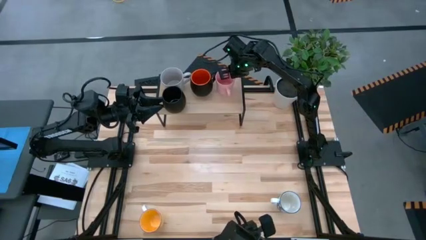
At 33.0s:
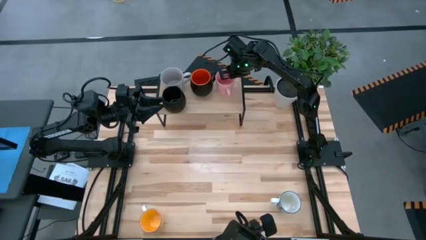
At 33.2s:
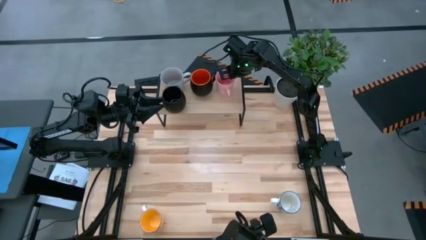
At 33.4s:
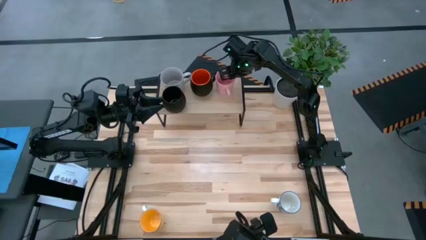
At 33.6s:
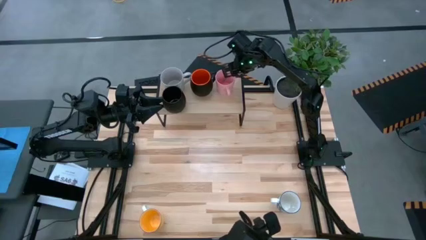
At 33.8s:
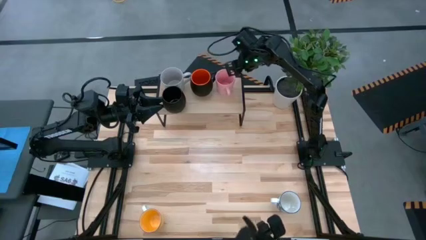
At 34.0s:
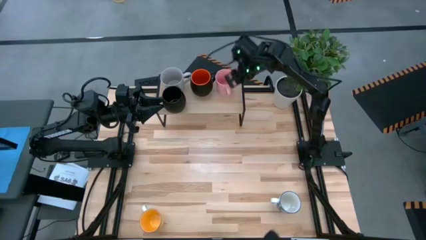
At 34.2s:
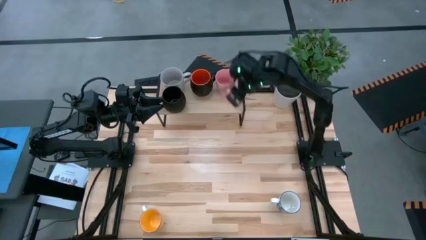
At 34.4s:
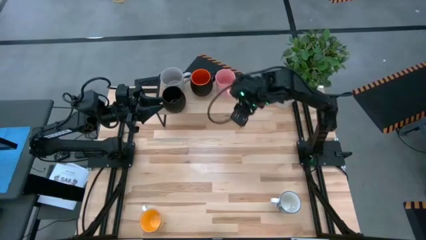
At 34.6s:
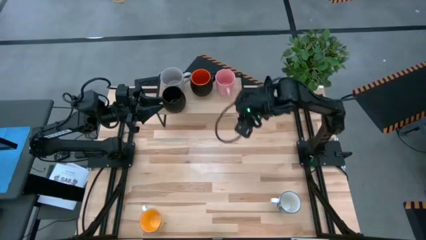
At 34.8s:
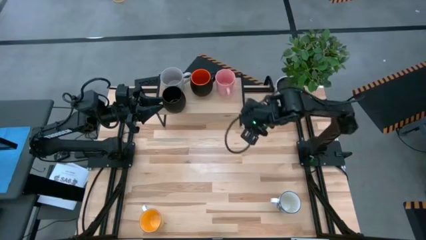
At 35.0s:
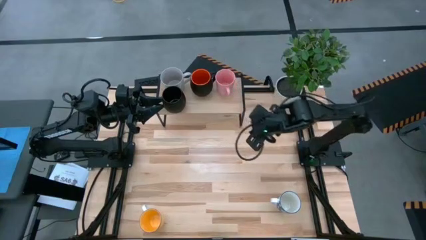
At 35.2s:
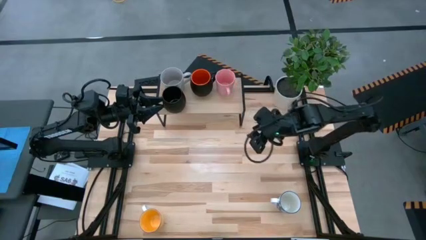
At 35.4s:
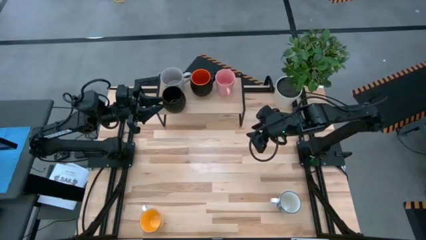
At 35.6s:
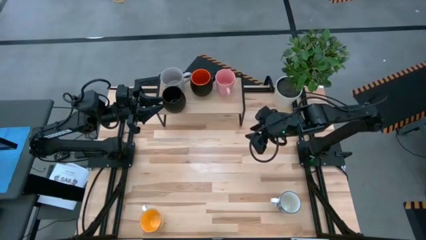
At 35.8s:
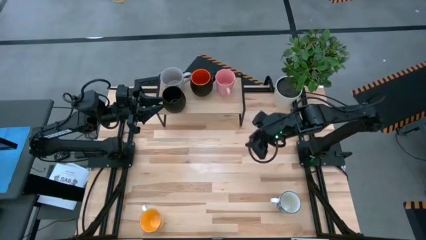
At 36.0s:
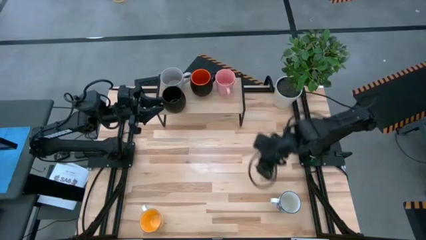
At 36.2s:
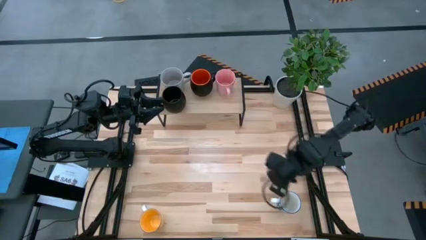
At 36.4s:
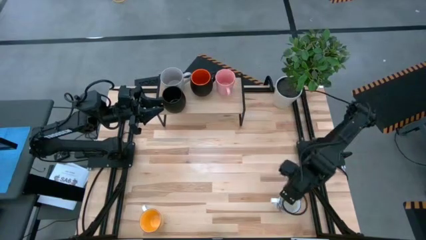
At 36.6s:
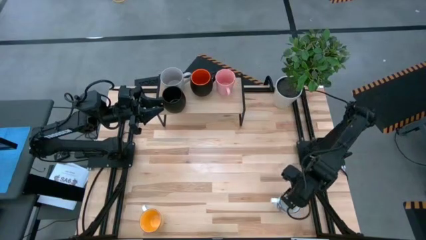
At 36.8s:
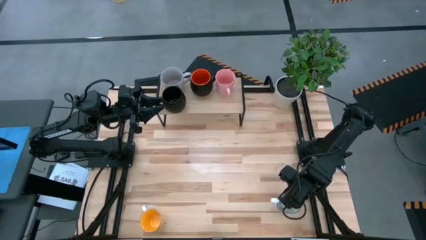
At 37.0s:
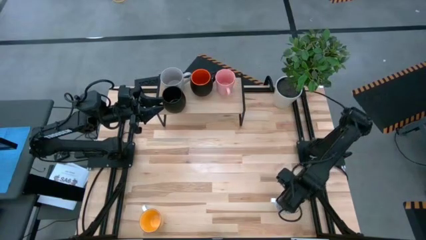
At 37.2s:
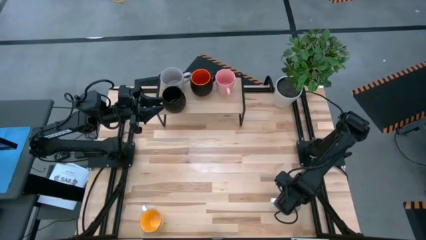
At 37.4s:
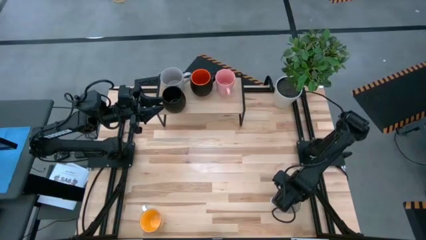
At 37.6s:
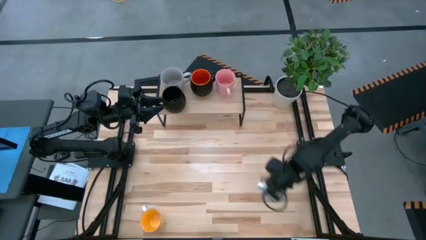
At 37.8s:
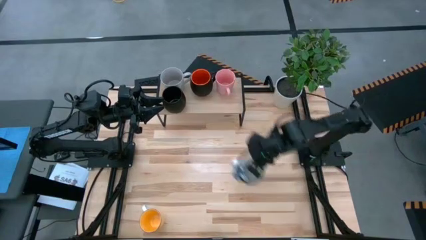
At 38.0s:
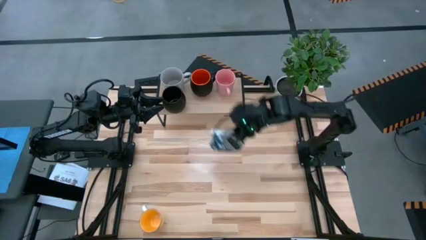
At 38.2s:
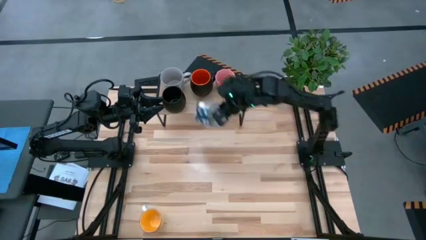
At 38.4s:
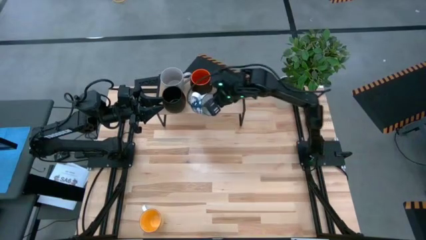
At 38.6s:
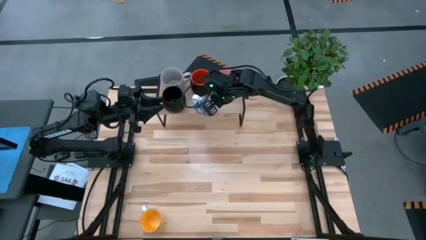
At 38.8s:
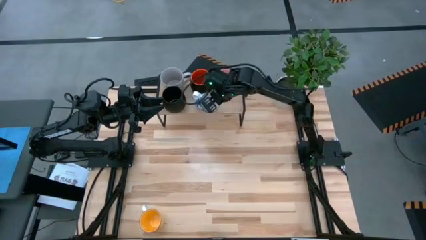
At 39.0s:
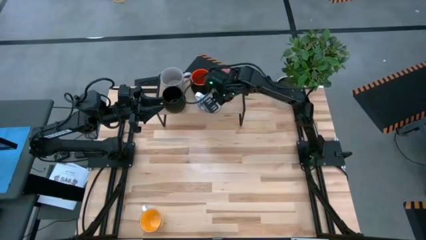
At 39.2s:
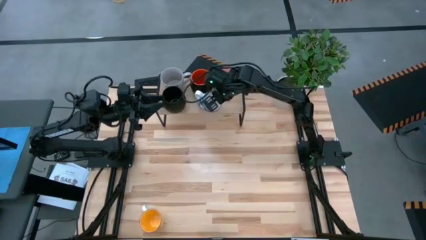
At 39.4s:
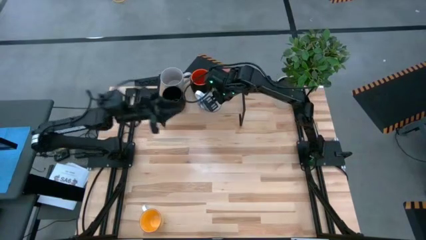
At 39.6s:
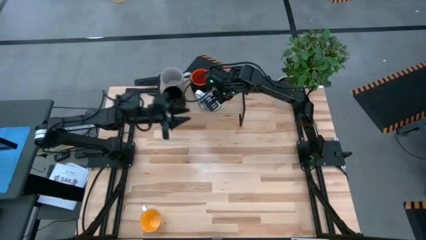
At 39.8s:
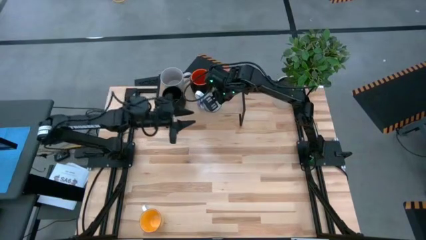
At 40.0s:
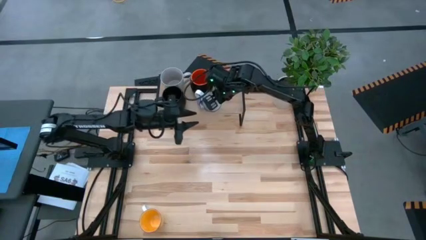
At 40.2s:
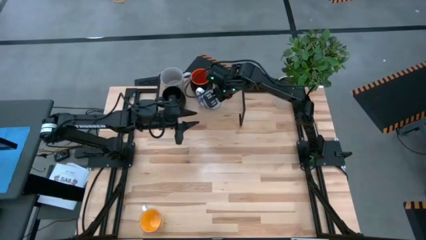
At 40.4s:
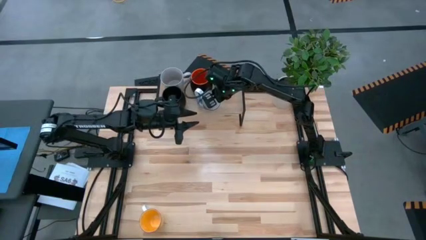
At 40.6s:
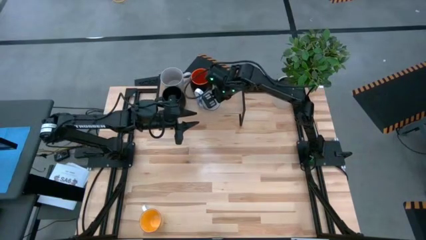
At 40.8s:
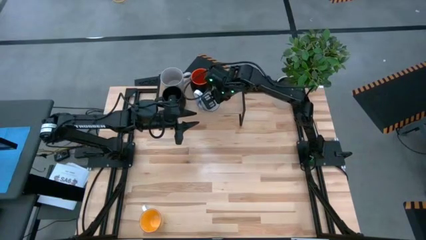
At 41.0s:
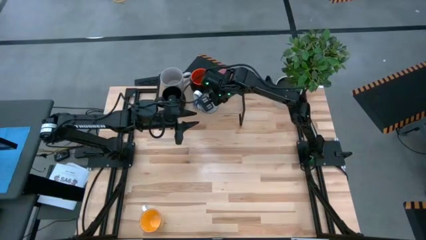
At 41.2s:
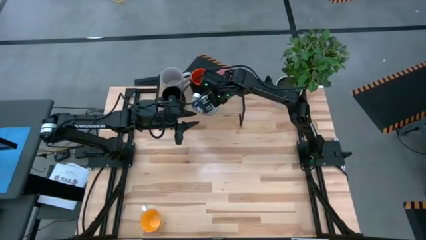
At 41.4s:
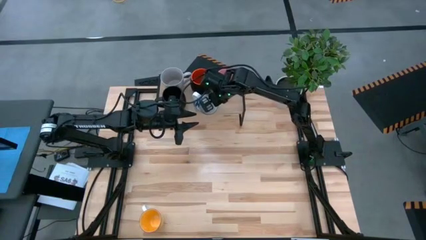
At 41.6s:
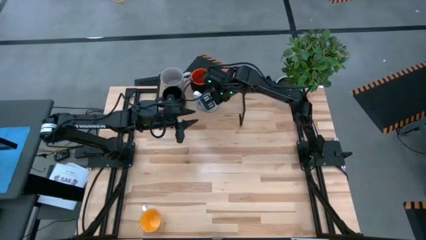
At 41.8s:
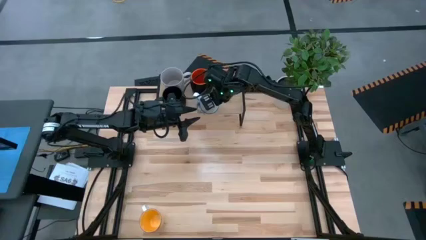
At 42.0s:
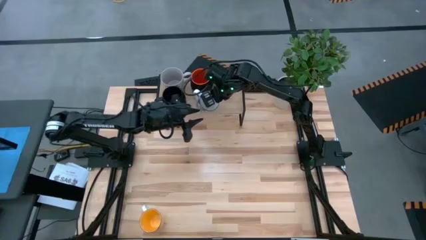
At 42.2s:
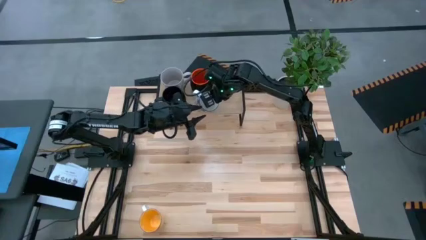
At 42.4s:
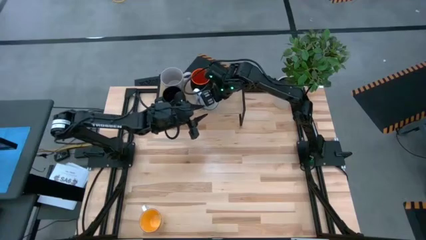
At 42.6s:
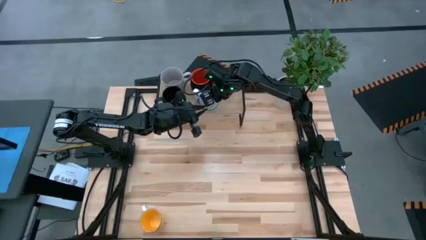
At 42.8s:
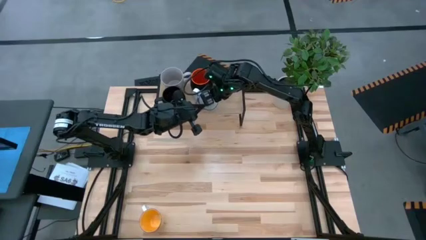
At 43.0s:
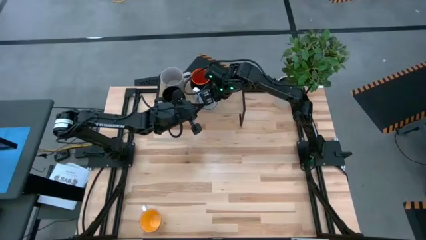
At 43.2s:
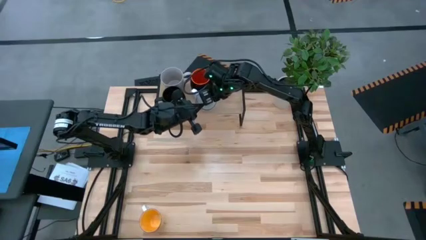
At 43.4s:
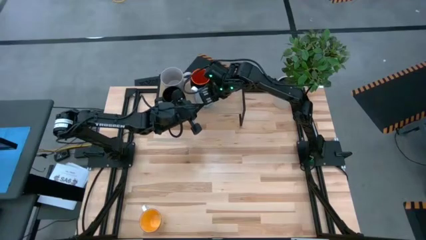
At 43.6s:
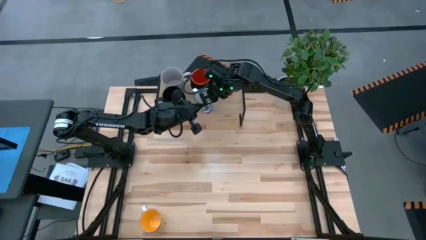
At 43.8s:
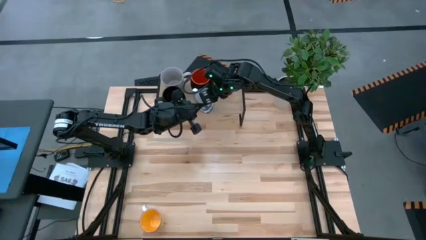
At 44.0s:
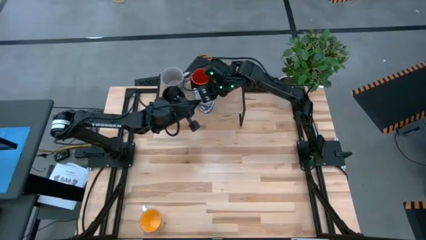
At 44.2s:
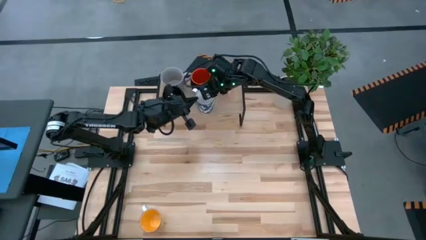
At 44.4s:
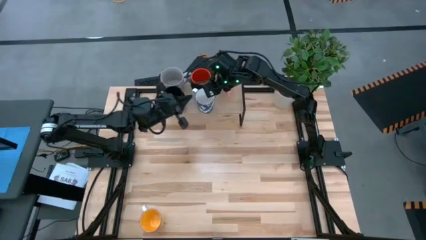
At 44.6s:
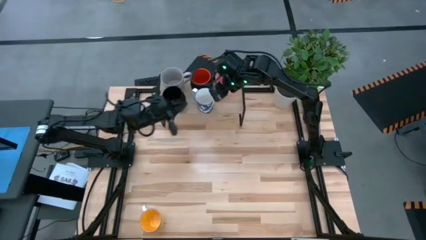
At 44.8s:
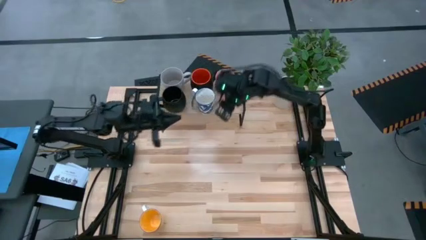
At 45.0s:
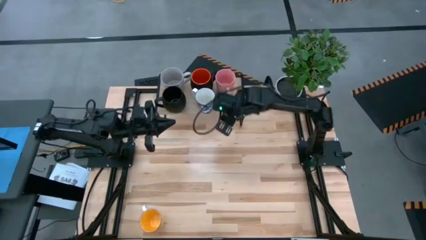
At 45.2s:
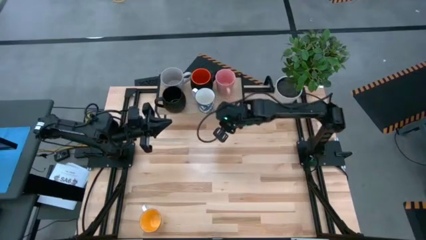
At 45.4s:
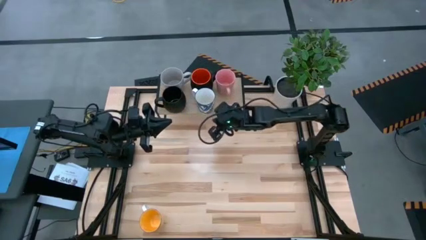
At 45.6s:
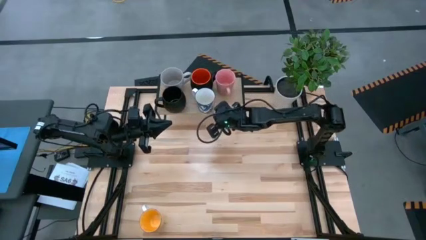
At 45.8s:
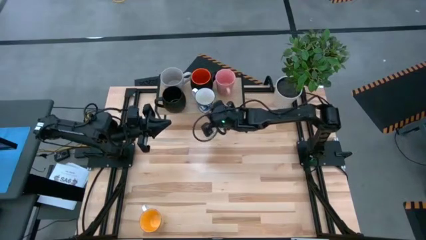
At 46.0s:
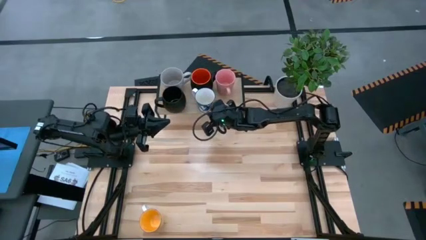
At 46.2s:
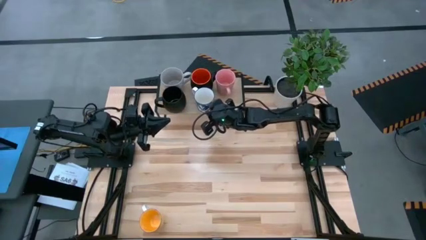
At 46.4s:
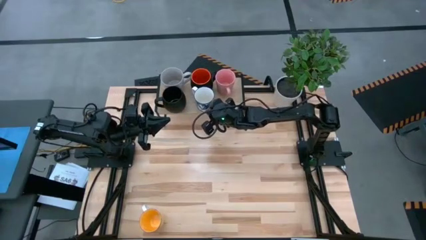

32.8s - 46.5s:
Task: Place coffee mugs
Put the white and blue cup on the shelf

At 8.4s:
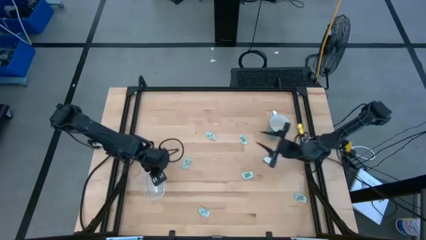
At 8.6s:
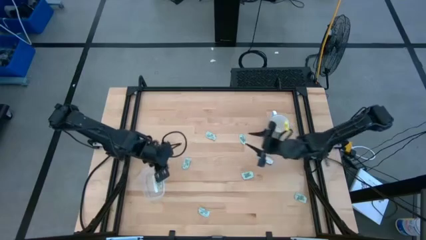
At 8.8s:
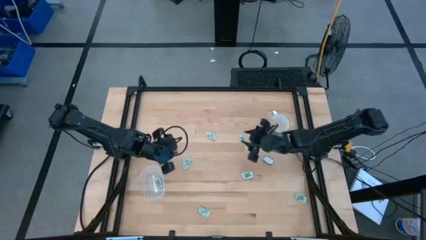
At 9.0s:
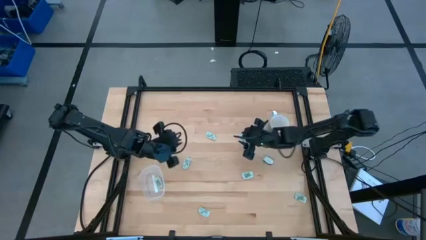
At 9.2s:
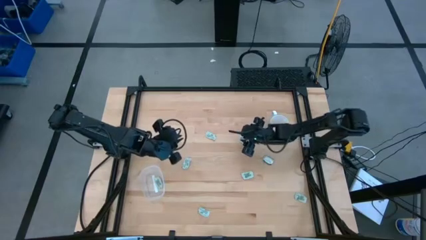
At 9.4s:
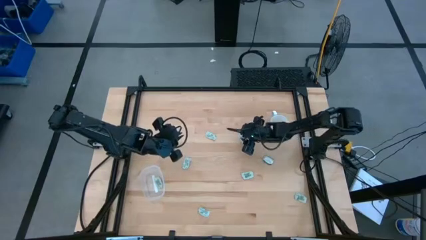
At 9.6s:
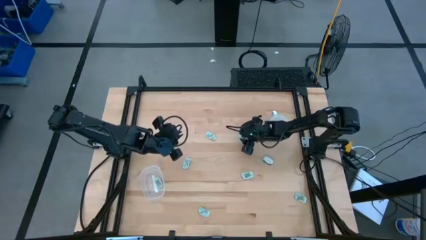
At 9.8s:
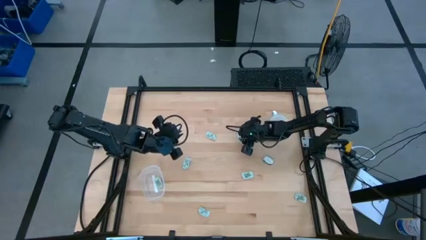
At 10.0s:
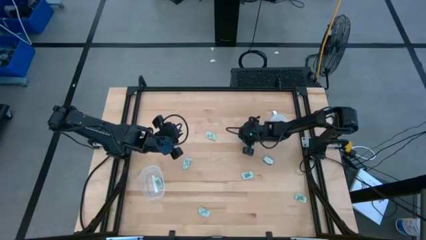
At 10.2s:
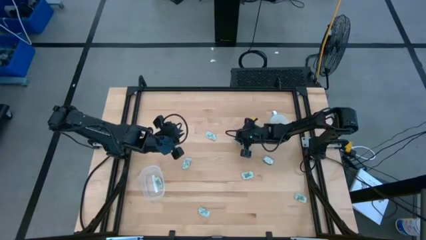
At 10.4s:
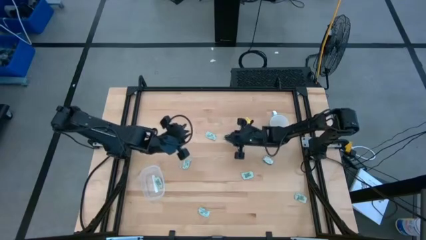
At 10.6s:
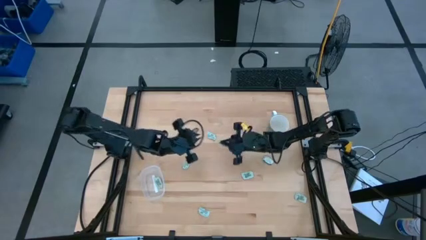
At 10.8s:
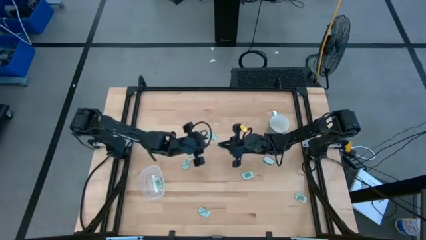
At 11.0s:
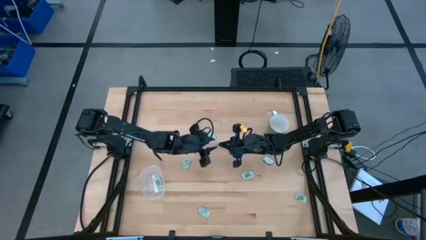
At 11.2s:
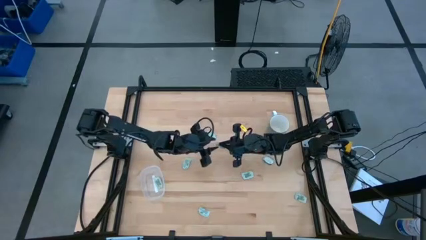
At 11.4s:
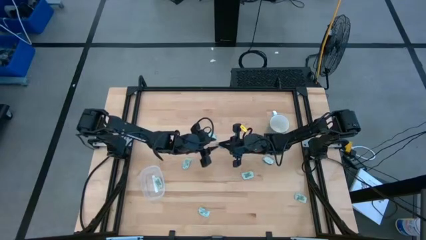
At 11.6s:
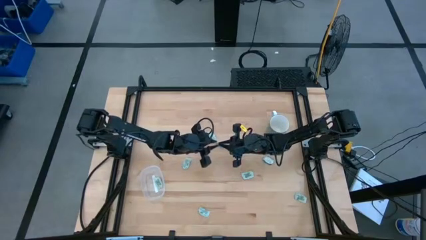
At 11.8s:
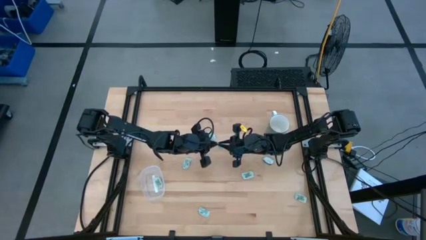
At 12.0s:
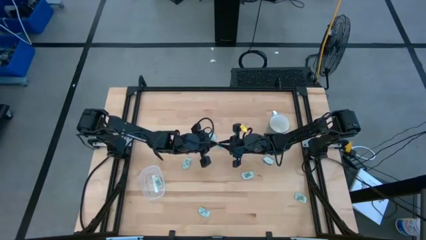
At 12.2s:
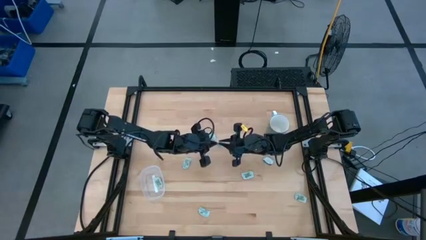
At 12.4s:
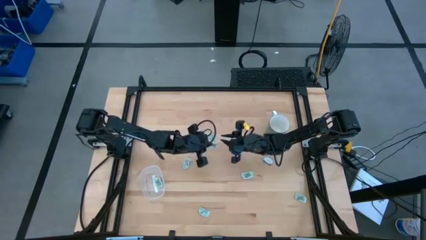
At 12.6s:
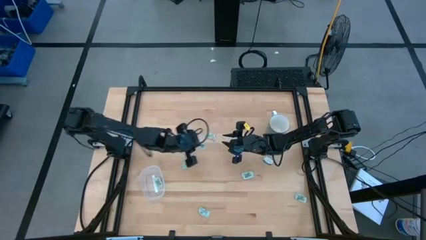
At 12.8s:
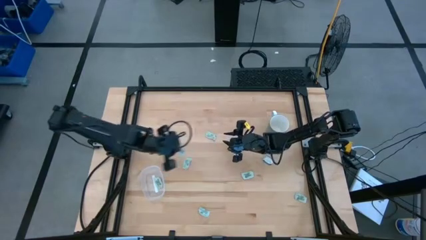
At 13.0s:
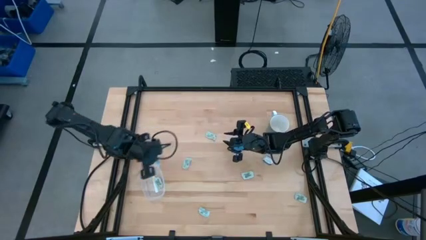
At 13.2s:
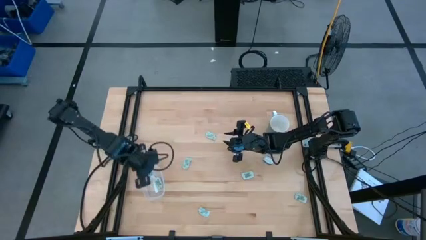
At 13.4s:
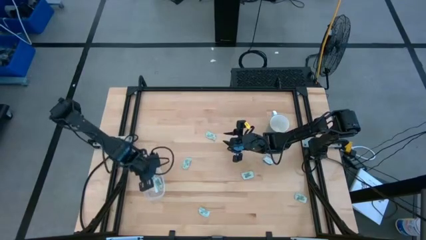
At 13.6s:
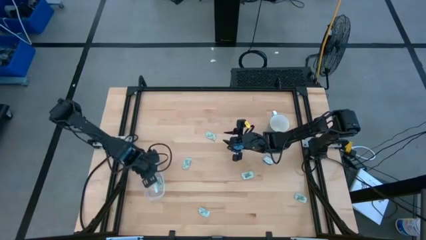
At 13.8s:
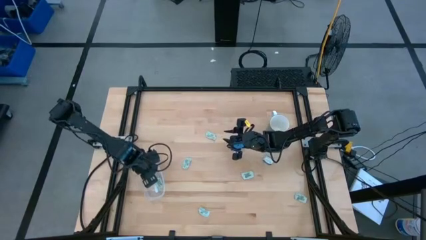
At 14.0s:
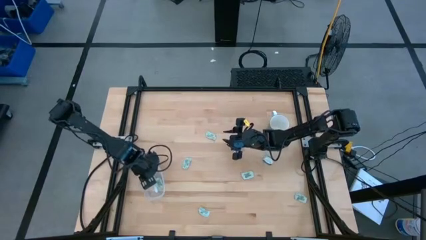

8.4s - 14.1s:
Task: Pick and place Stevia / Truvia into bins
Put the stevia packet into the transparent container
